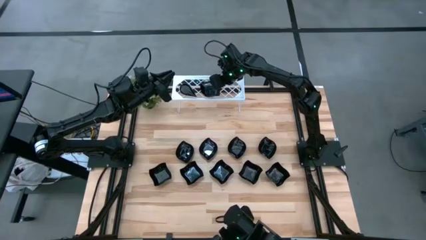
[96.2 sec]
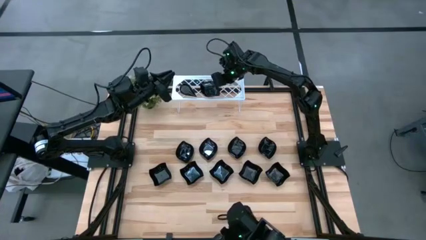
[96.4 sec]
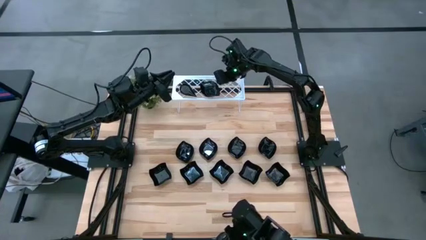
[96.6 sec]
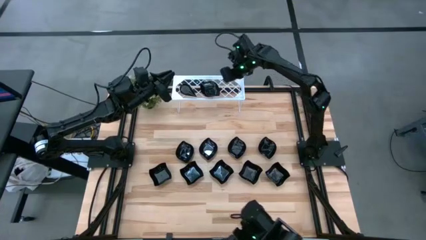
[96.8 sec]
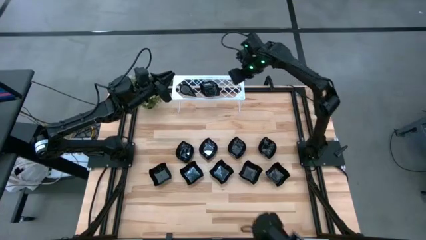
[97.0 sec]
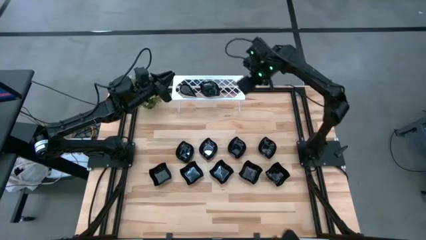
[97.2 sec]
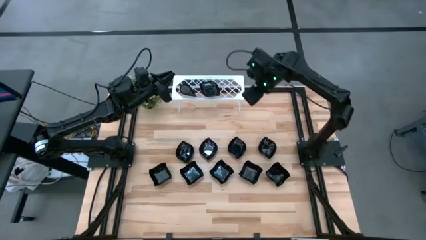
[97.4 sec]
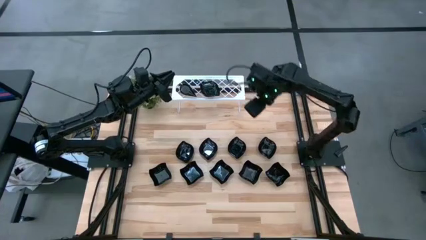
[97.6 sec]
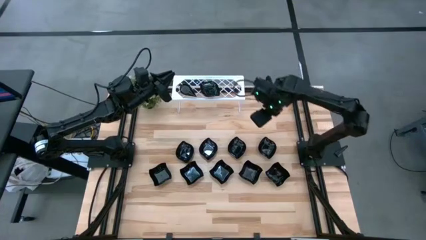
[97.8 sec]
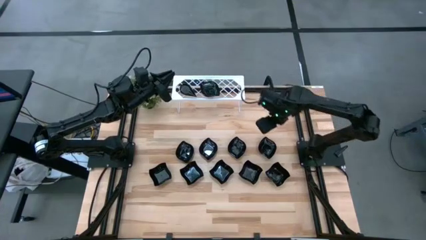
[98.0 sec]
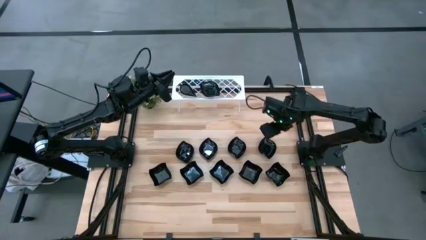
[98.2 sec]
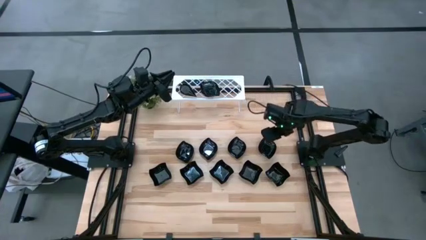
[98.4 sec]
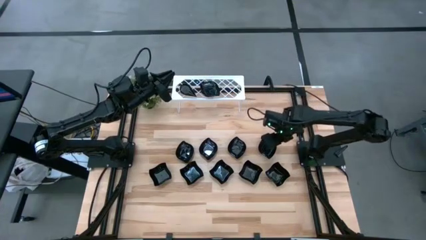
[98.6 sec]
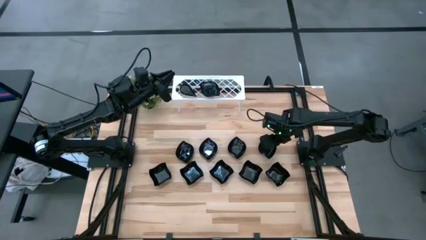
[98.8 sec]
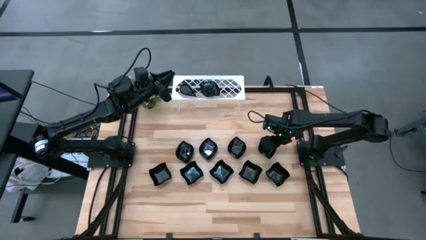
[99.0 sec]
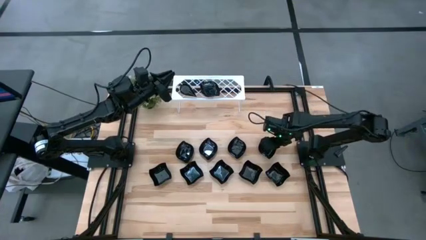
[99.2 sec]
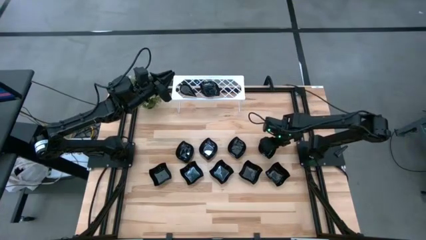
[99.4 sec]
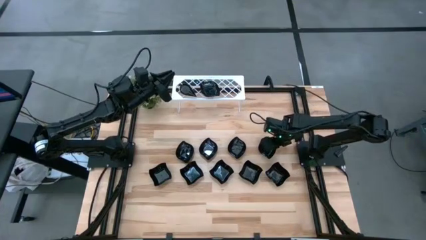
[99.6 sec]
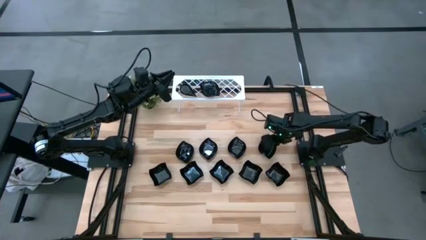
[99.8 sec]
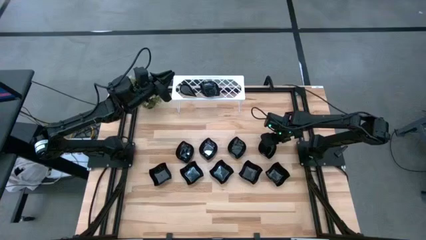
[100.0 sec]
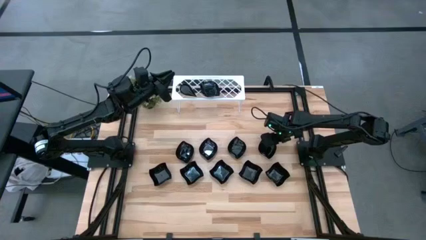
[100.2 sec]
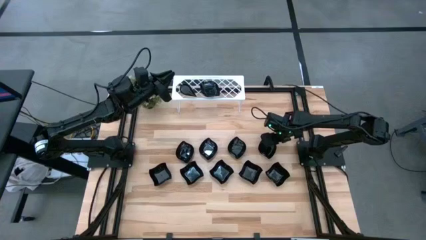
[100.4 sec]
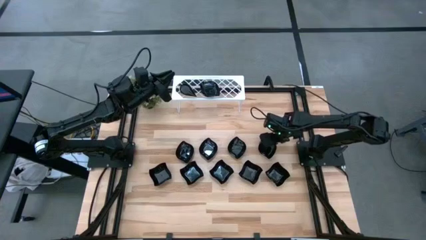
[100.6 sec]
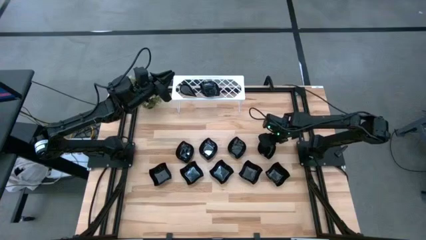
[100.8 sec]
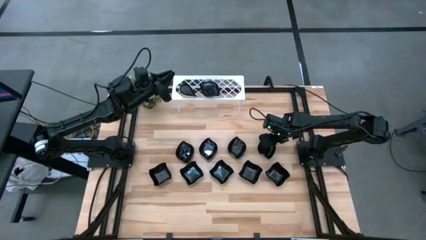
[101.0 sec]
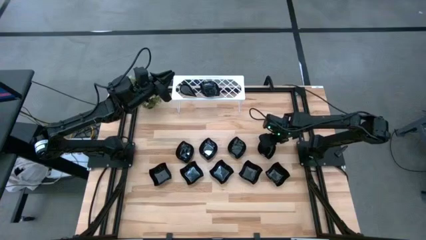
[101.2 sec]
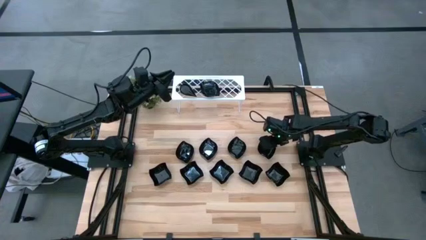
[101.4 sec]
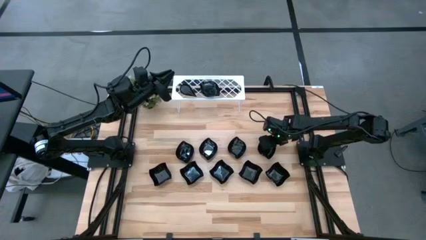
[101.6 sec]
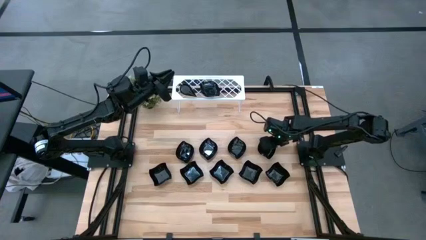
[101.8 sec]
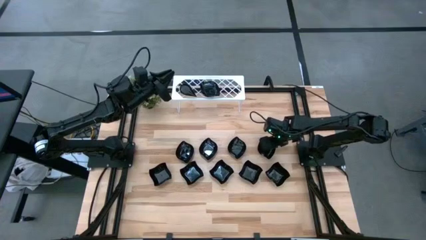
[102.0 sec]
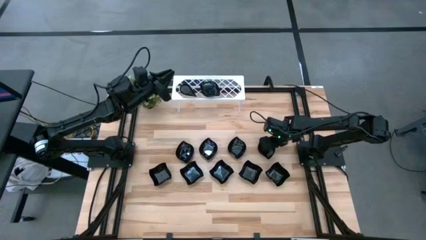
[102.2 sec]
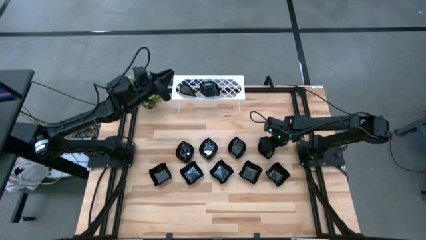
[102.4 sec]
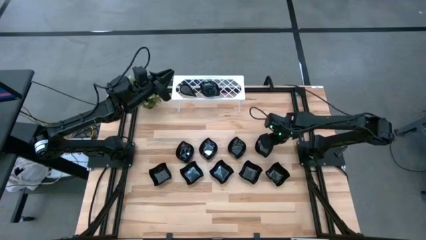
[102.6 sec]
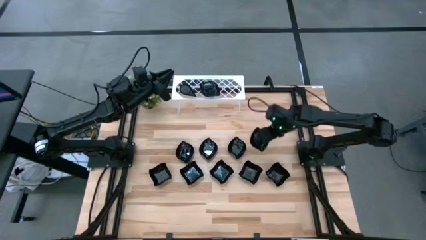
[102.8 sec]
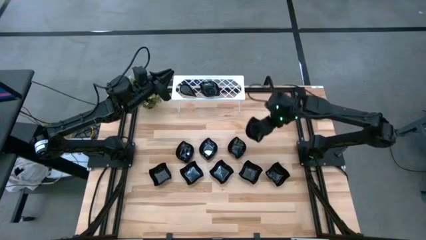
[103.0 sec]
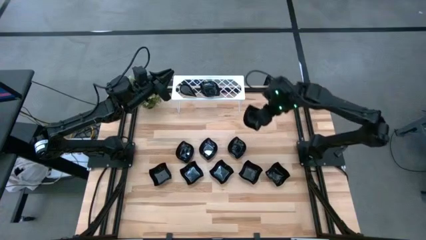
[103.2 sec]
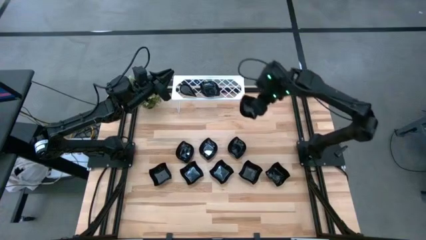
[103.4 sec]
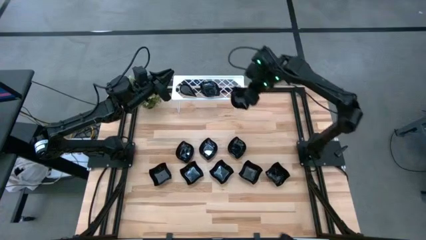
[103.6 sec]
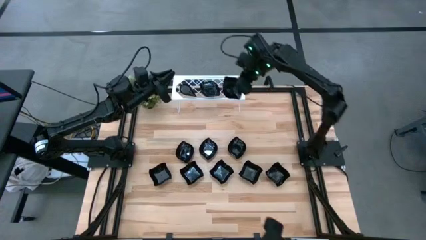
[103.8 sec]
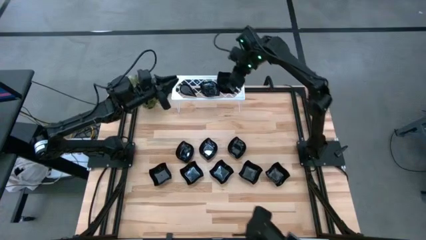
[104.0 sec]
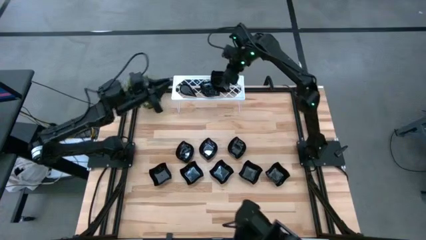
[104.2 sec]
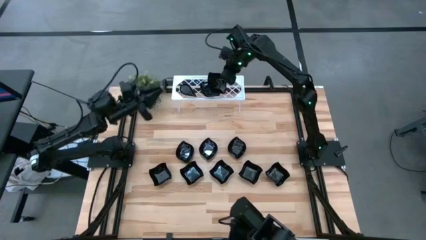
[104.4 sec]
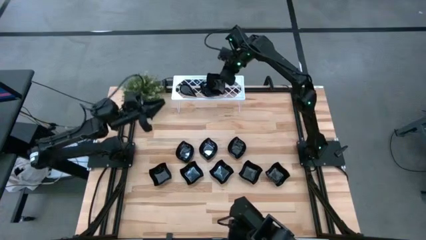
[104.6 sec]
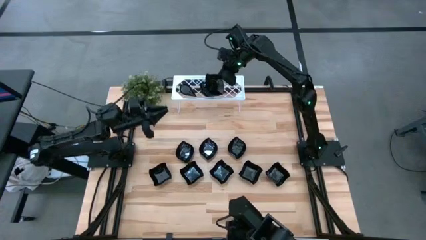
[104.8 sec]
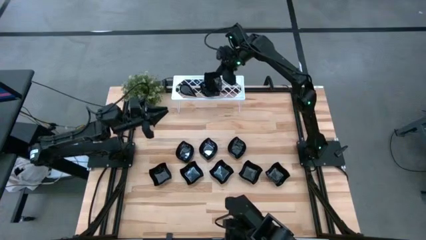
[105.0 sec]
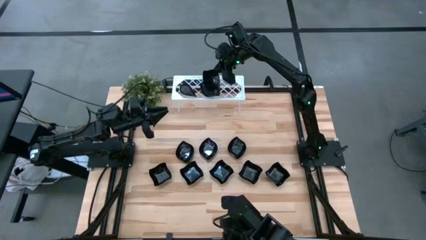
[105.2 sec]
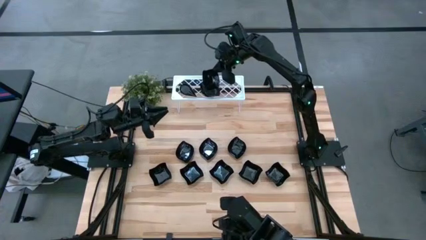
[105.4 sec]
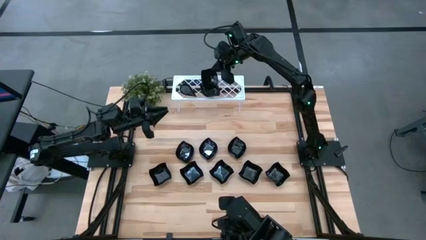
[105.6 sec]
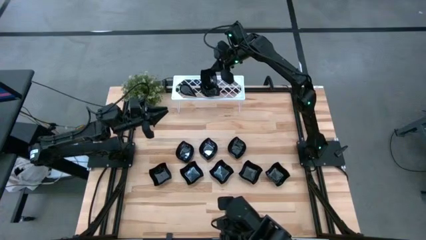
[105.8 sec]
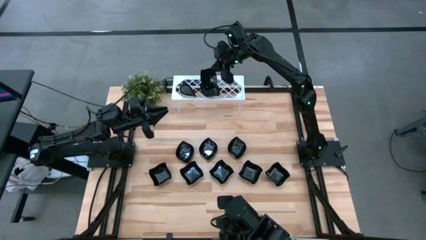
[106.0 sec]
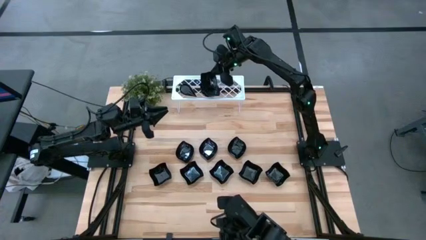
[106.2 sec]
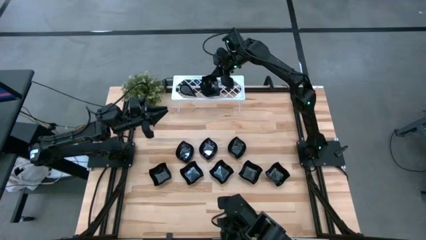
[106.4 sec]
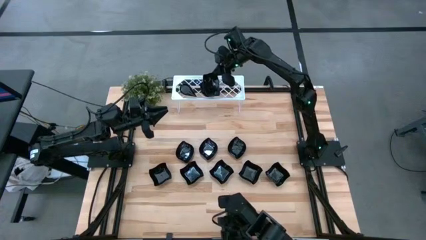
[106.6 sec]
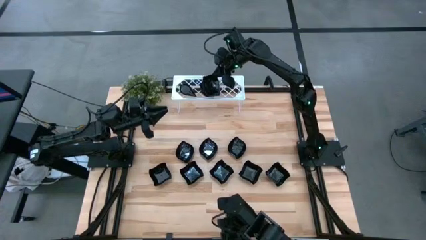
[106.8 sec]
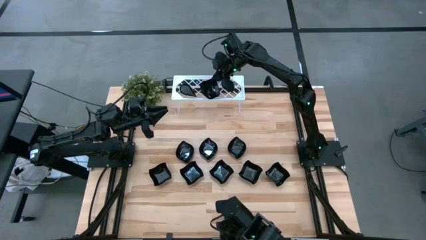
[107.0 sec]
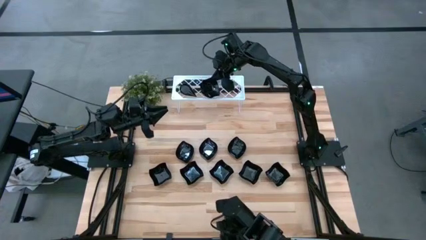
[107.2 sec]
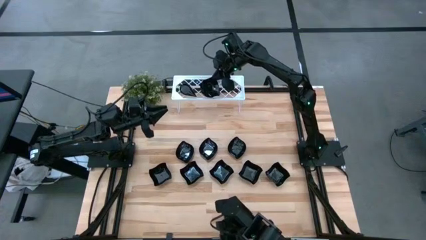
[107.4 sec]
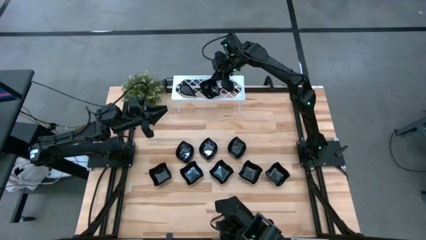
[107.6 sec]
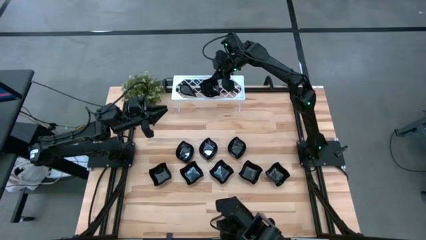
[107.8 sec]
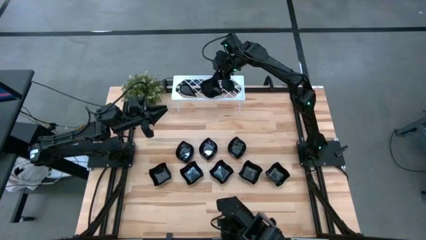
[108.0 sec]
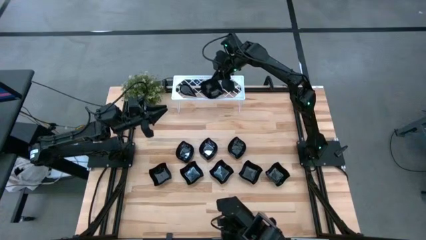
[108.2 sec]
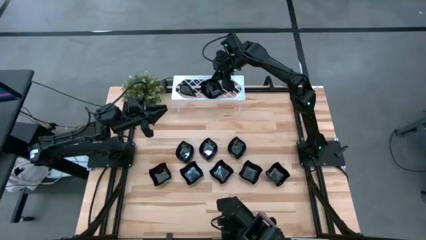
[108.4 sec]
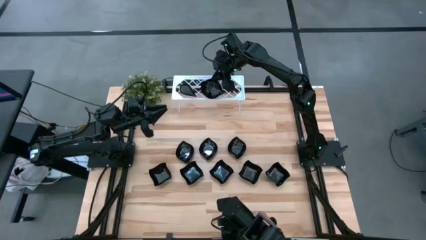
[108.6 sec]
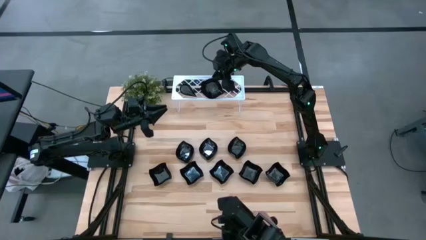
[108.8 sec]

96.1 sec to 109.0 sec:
Task: Pick & Place Mini shaped plates
Stack the black leaf shaped plate on top of the black leaf shaped plate on the shelf
